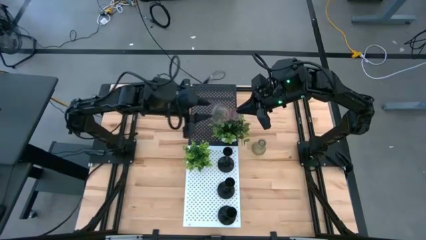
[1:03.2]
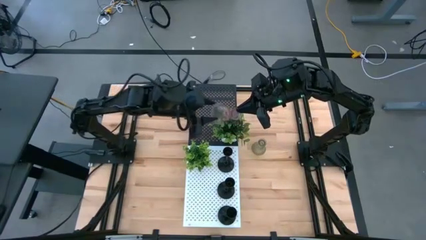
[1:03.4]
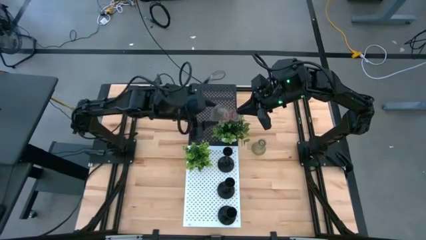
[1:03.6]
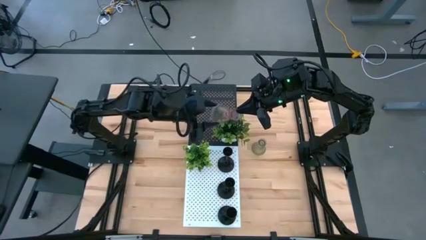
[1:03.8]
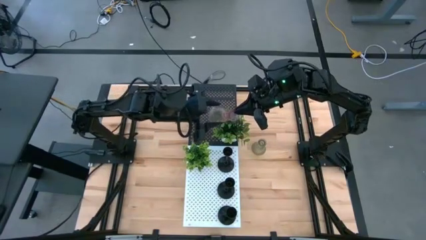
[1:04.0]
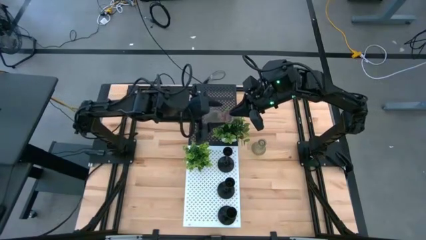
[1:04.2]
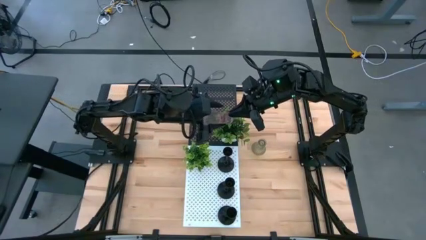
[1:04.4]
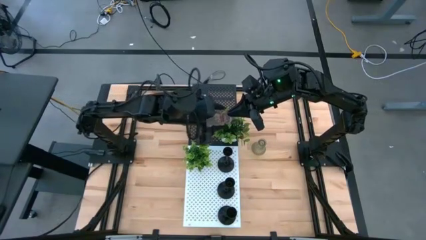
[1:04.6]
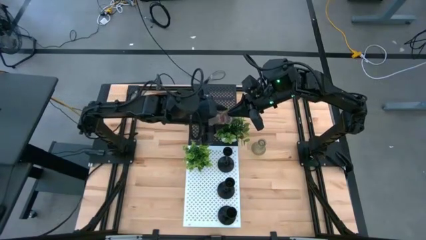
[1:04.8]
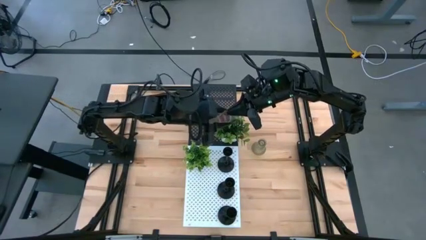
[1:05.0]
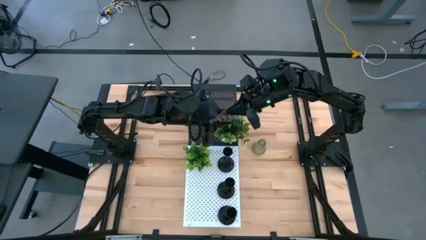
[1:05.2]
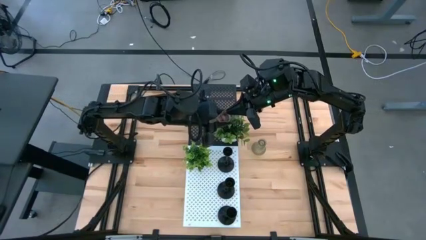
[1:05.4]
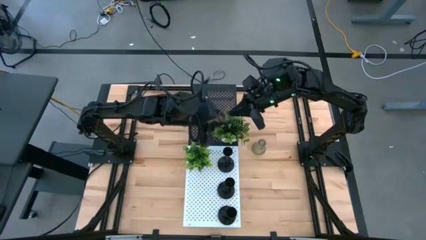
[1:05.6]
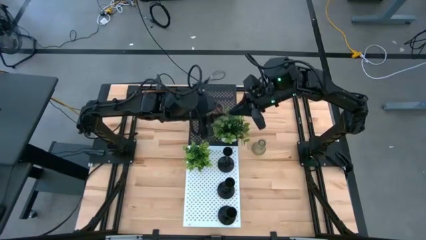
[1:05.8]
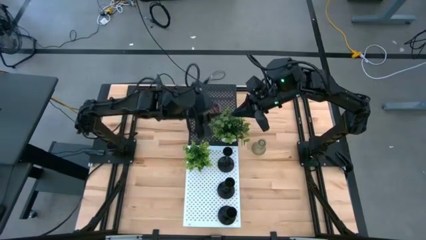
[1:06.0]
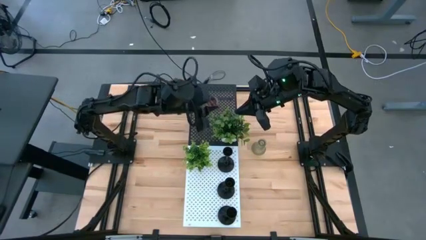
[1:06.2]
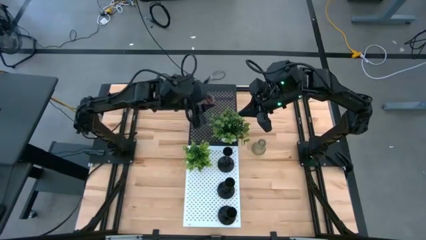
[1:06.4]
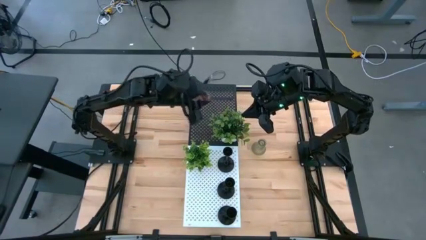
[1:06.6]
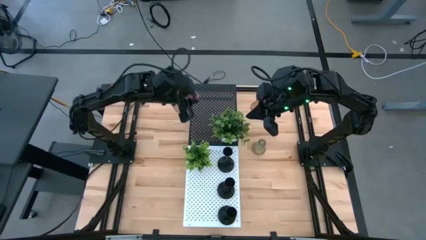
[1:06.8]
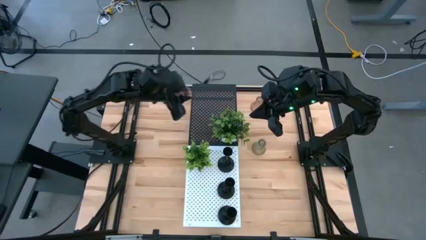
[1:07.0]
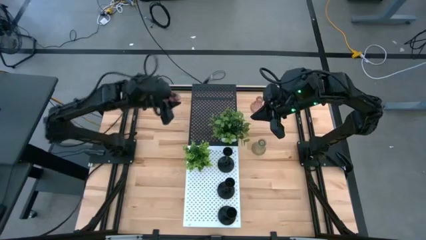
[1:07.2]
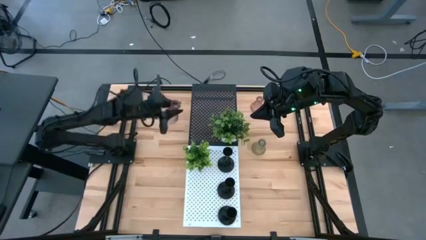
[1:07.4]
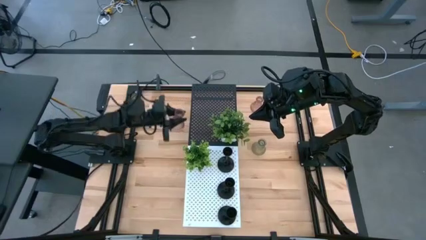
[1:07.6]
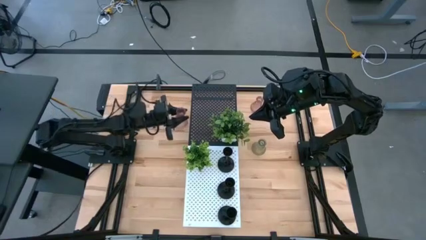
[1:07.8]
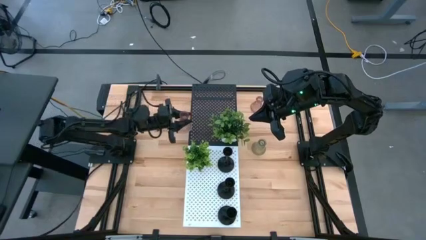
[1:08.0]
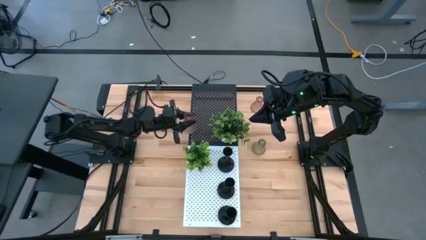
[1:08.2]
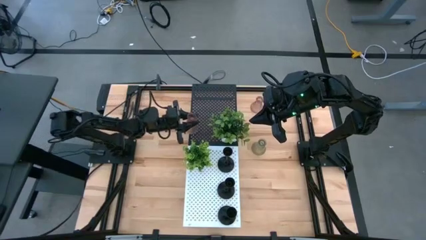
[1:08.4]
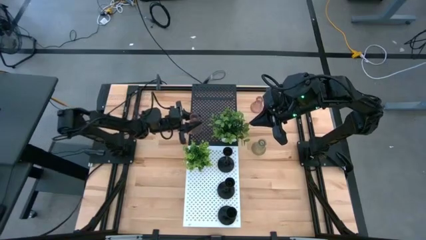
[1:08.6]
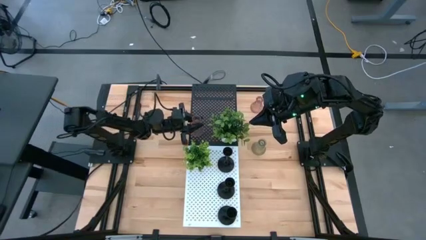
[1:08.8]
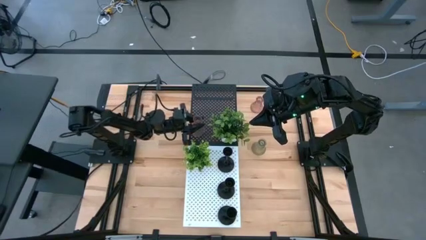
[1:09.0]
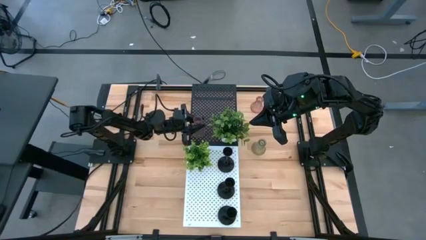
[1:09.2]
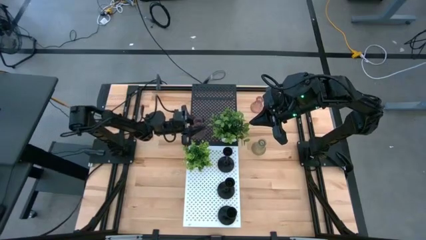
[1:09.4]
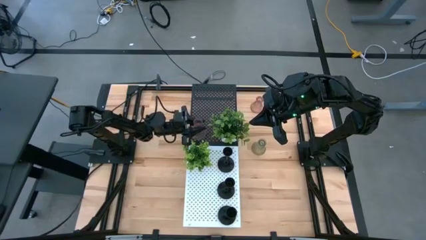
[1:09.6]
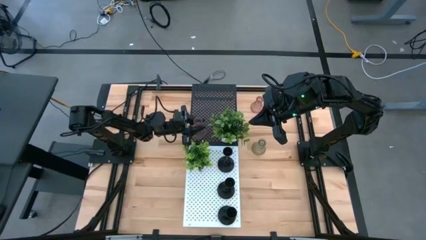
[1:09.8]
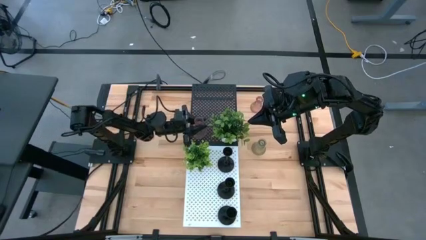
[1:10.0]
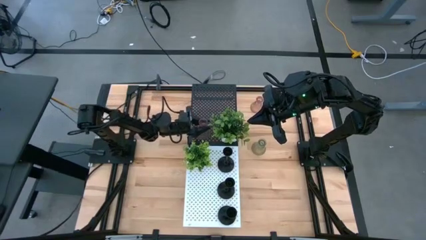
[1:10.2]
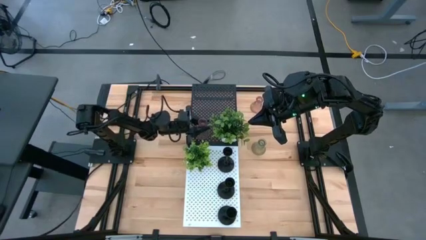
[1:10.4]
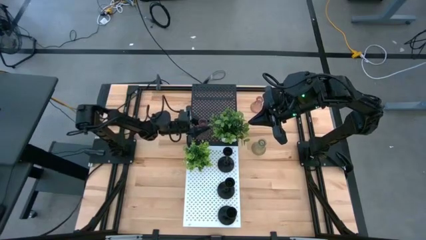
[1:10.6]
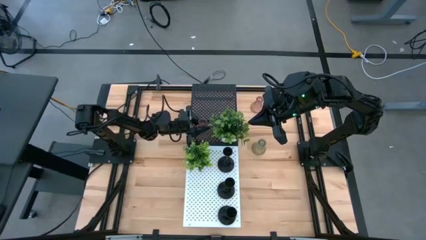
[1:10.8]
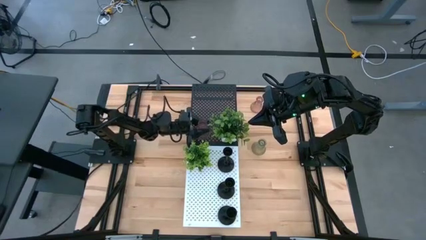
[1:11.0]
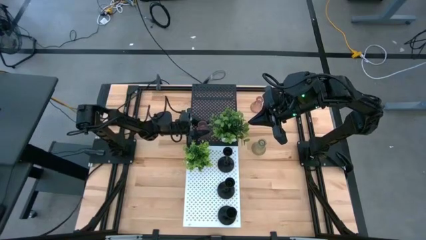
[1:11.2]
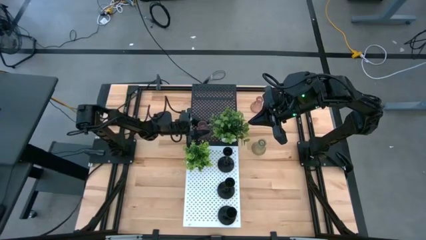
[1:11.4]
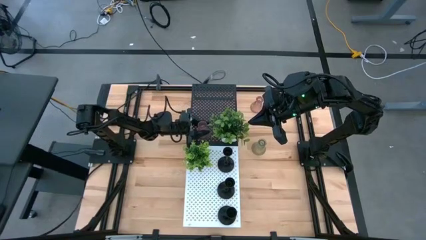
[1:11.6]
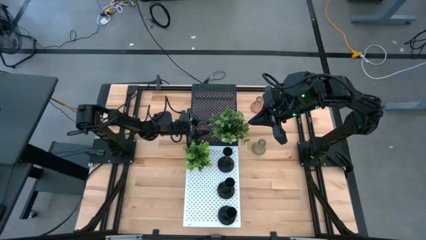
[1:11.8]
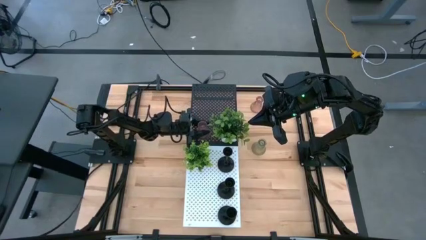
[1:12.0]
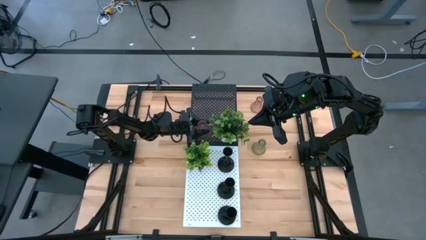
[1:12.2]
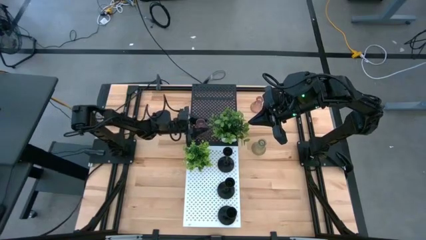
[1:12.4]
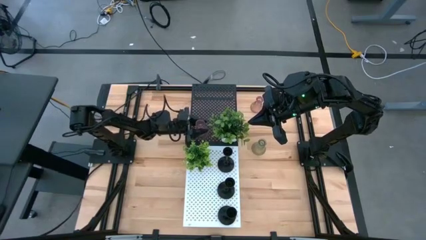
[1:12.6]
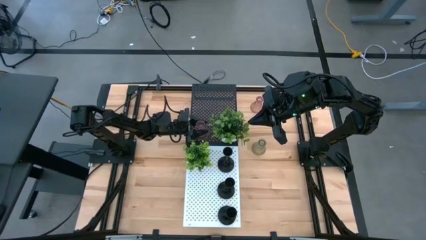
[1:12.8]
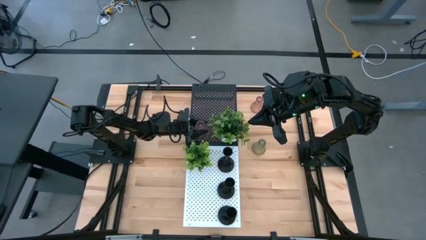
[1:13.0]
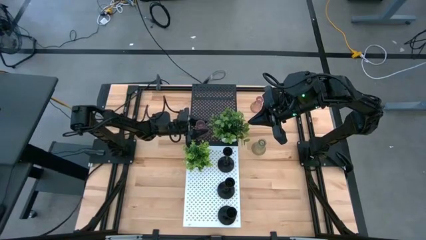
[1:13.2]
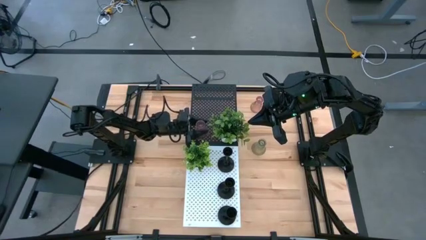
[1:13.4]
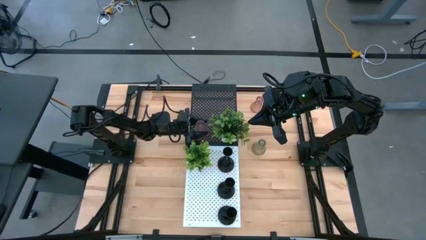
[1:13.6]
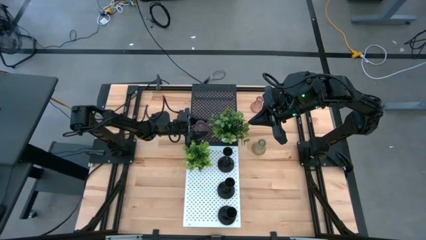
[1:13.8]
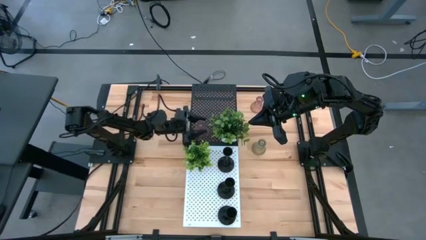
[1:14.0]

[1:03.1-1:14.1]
Task: Pick & Place candle stick holders
Put the bottom pink glass candle holder on the black shelf

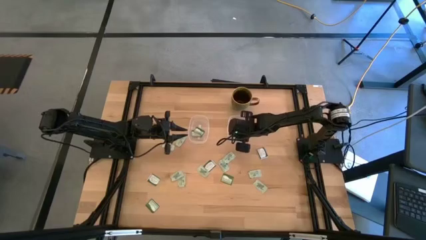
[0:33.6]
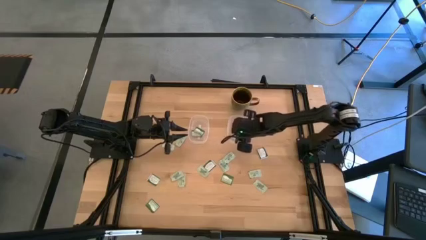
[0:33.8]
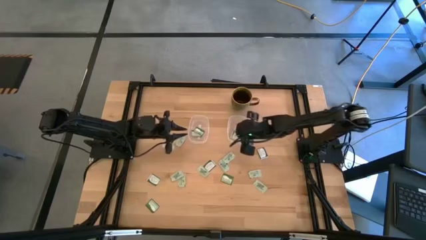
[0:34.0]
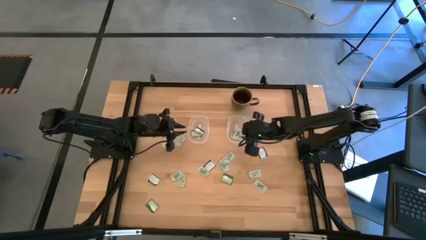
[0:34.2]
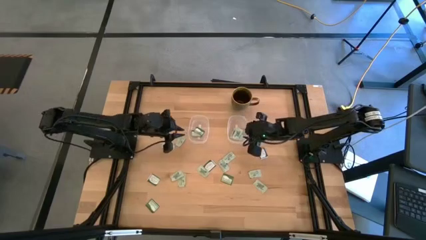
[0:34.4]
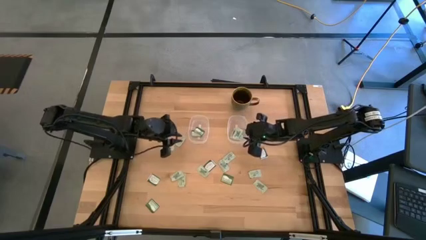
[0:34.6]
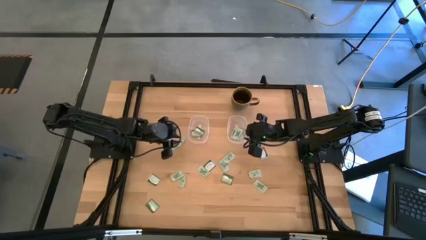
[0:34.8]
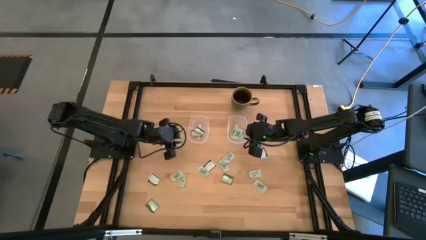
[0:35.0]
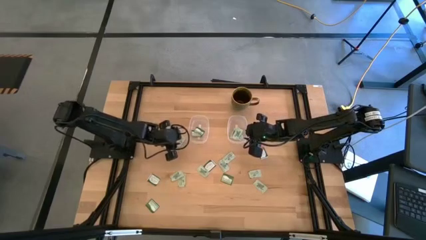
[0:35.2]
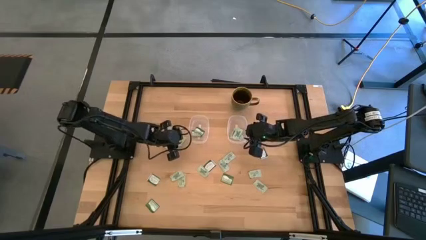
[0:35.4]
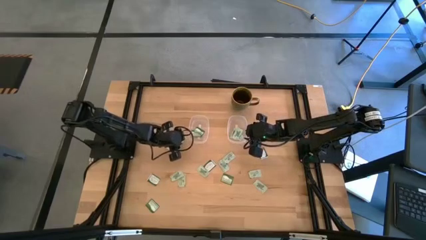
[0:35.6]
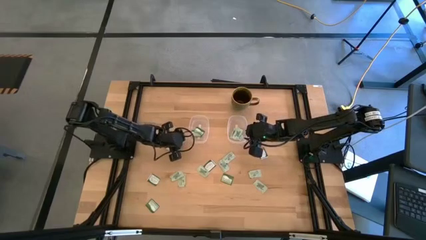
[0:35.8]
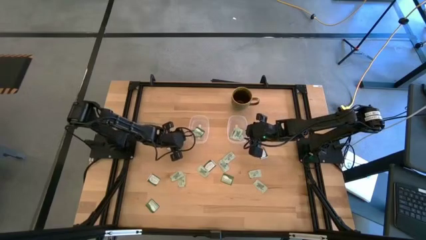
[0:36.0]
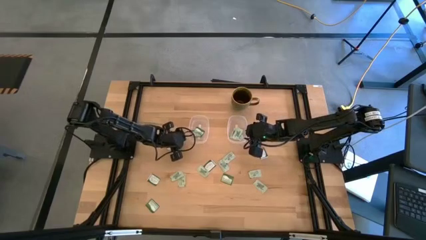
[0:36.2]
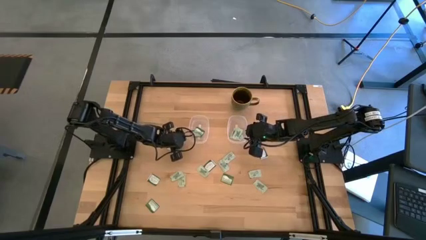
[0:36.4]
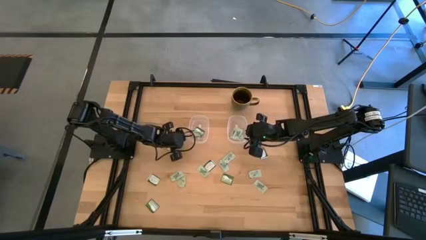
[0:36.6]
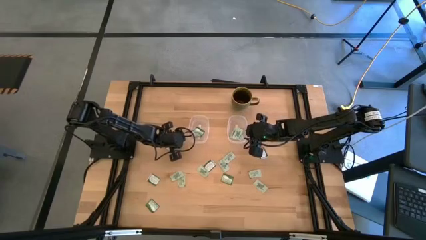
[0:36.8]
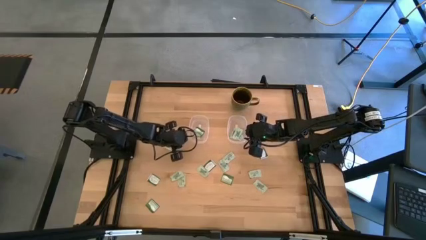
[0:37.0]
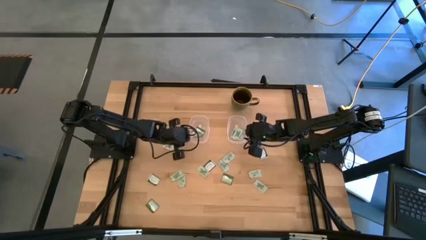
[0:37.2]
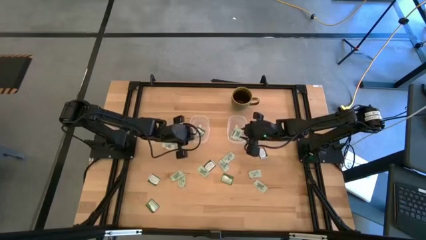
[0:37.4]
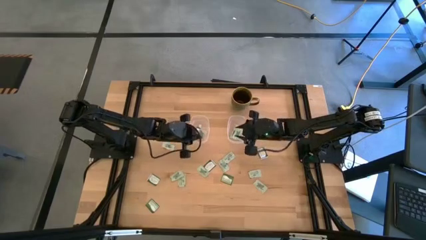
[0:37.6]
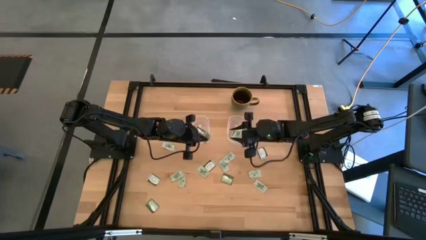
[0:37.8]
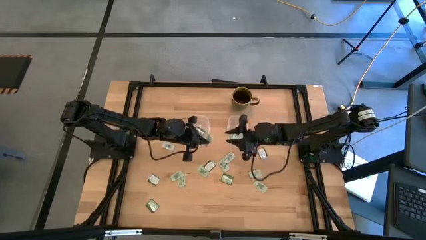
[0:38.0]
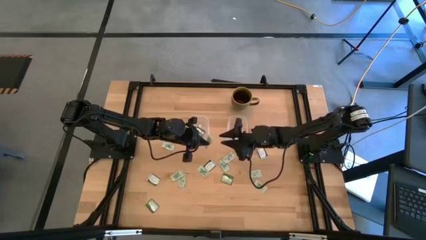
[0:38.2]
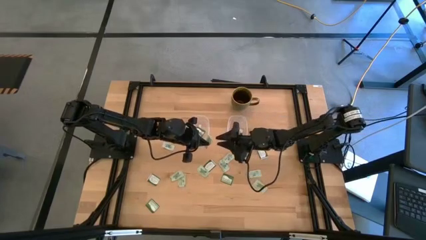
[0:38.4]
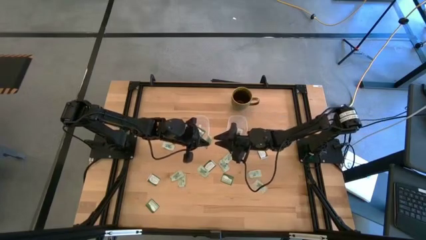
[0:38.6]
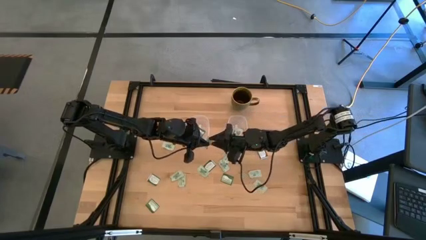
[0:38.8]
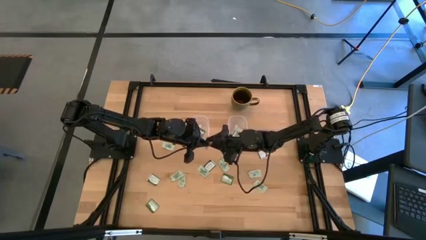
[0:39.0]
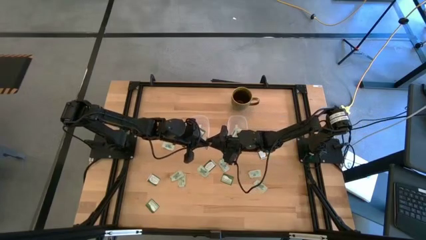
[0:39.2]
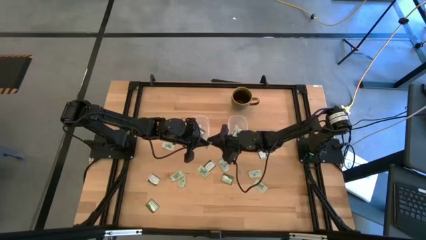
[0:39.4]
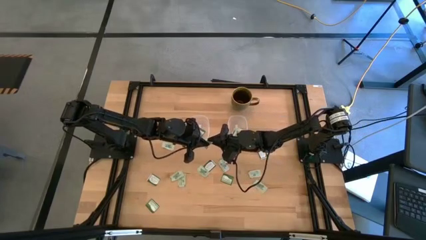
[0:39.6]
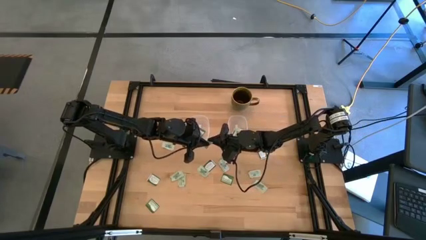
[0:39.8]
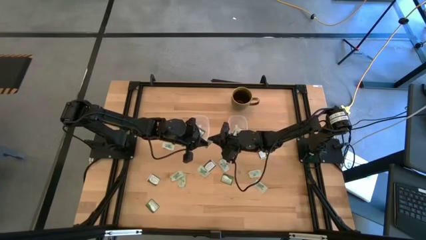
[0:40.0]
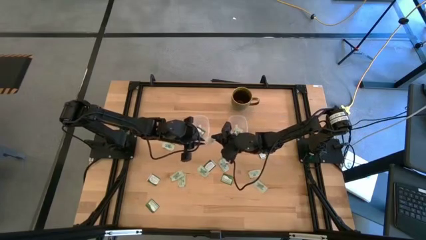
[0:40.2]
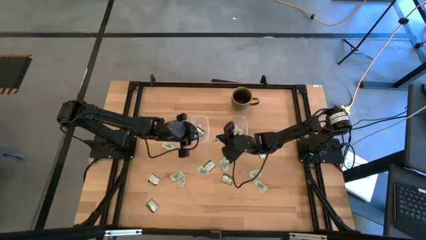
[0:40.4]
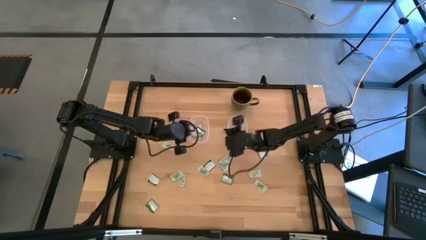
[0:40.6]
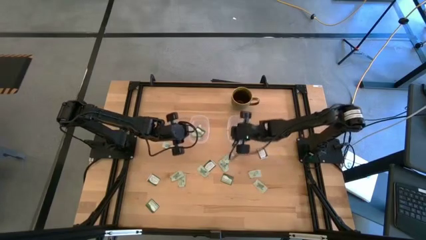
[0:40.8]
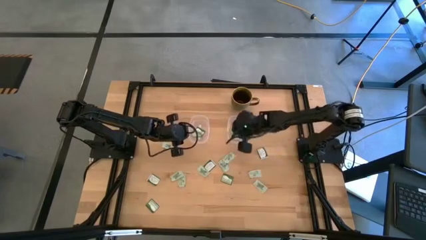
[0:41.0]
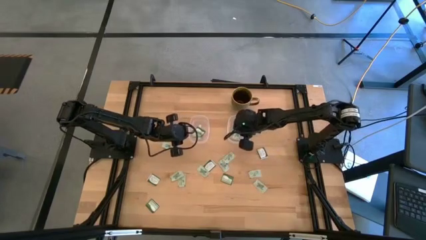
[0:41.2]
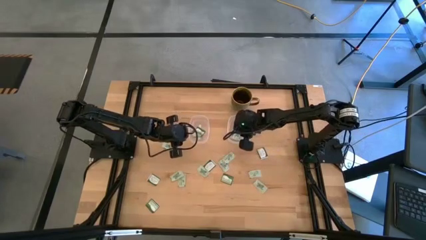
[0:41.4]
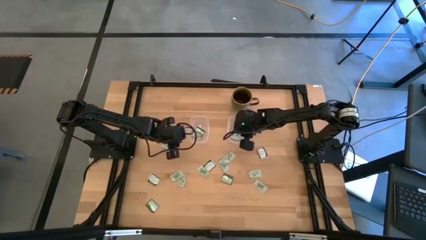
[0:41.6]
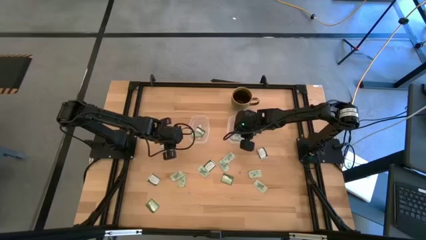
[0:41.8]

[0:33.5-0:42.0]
Task: Pick and place items into bin
Put the stevia packet into the right transparent bin
